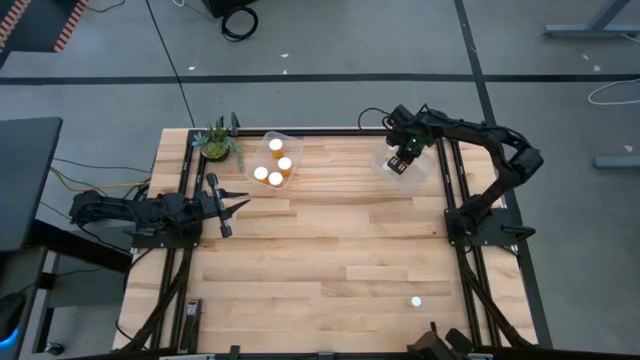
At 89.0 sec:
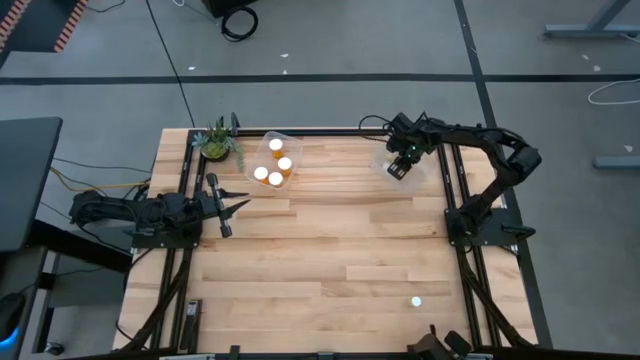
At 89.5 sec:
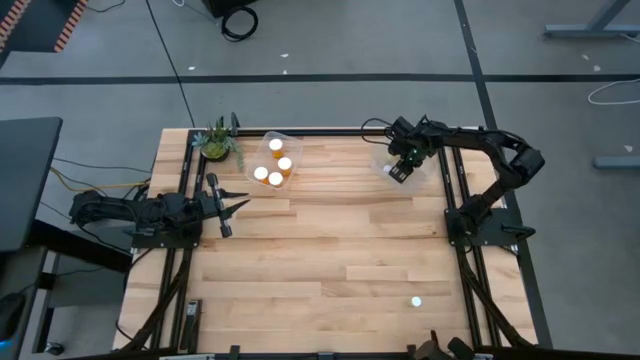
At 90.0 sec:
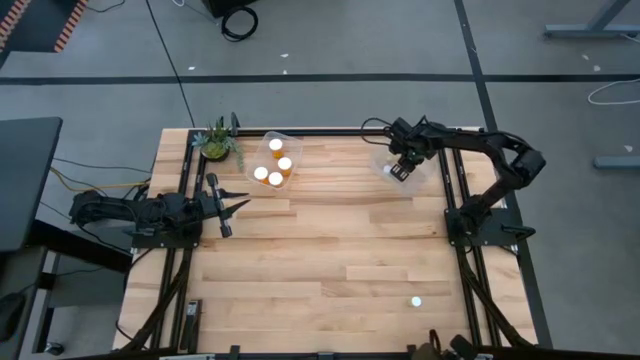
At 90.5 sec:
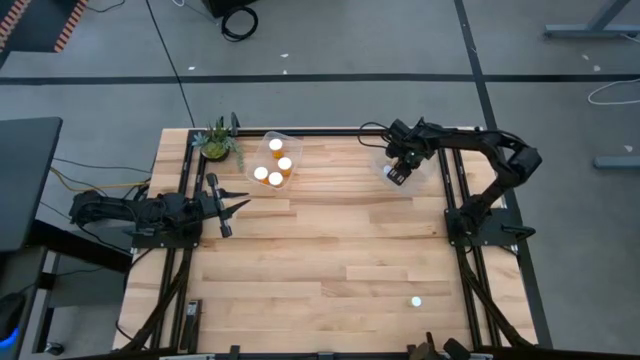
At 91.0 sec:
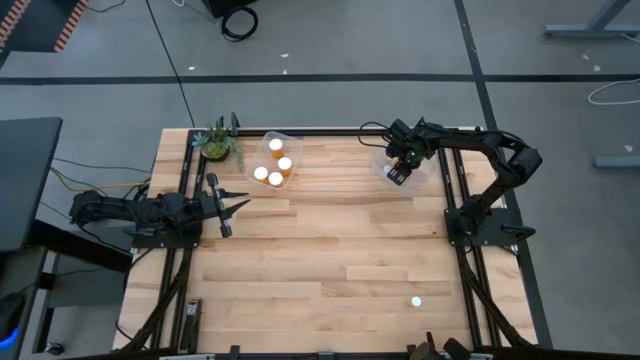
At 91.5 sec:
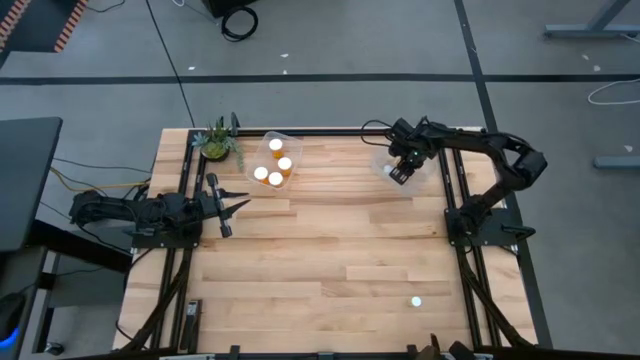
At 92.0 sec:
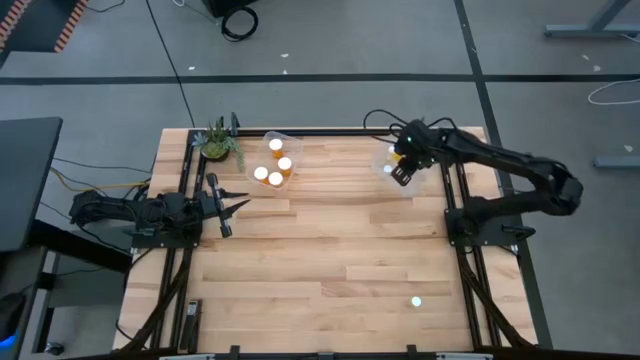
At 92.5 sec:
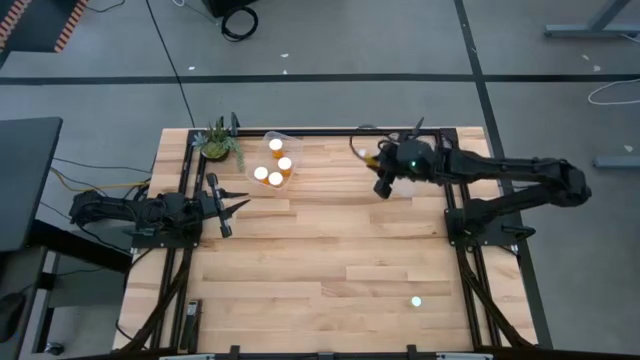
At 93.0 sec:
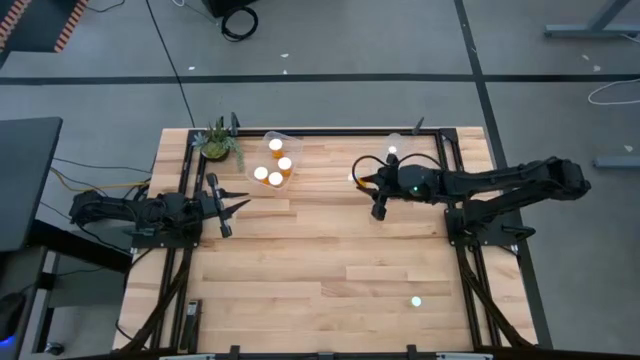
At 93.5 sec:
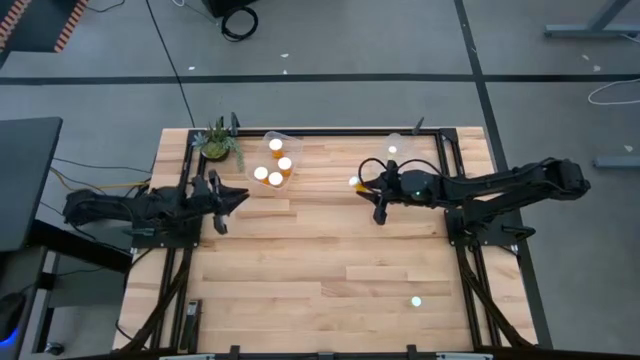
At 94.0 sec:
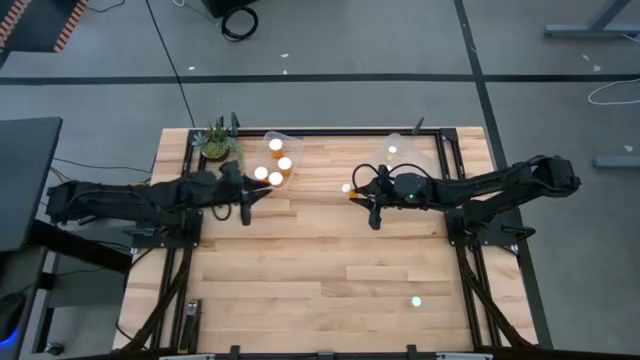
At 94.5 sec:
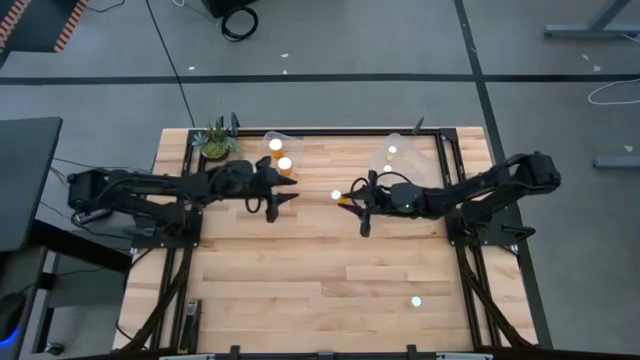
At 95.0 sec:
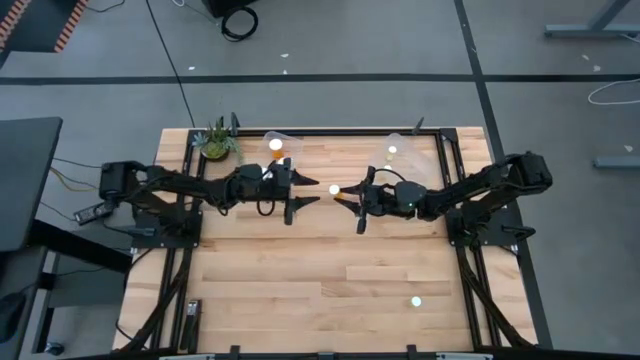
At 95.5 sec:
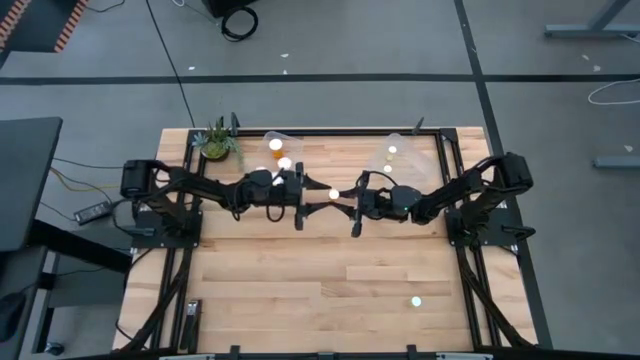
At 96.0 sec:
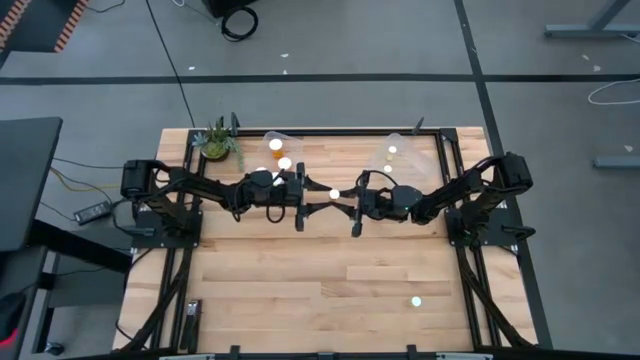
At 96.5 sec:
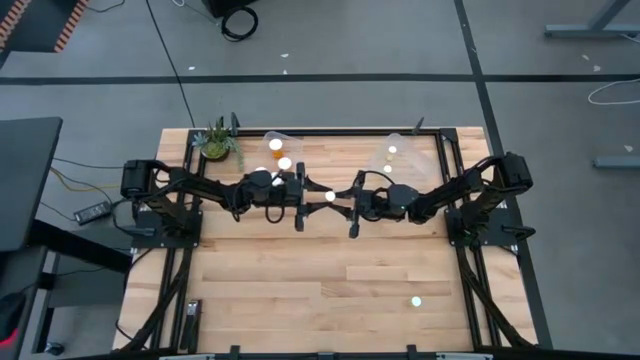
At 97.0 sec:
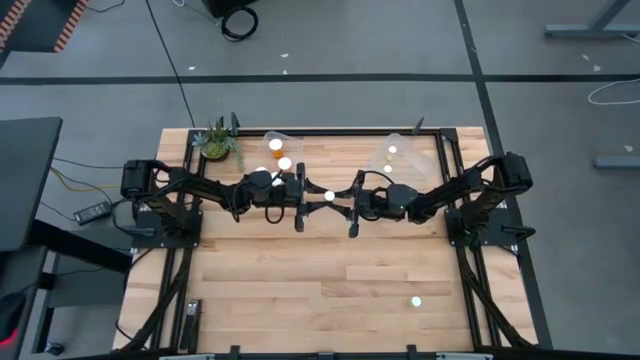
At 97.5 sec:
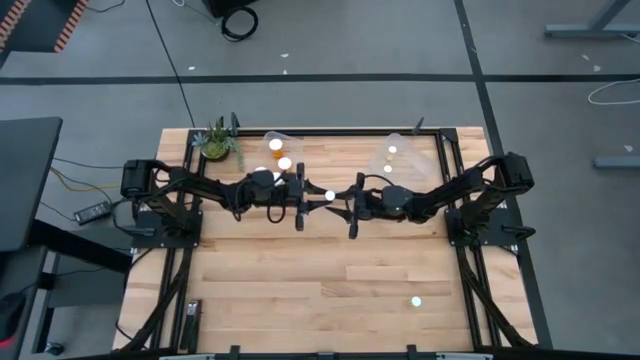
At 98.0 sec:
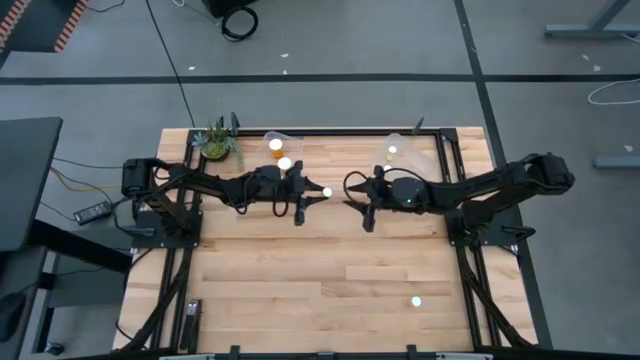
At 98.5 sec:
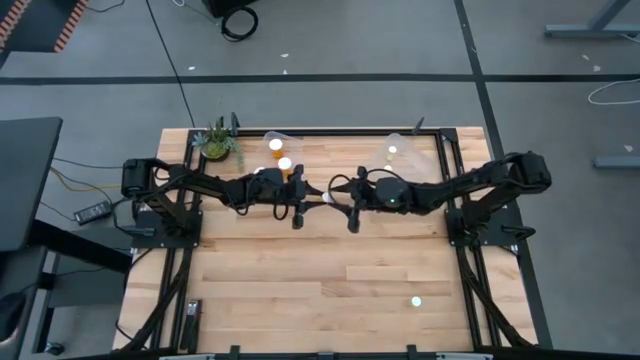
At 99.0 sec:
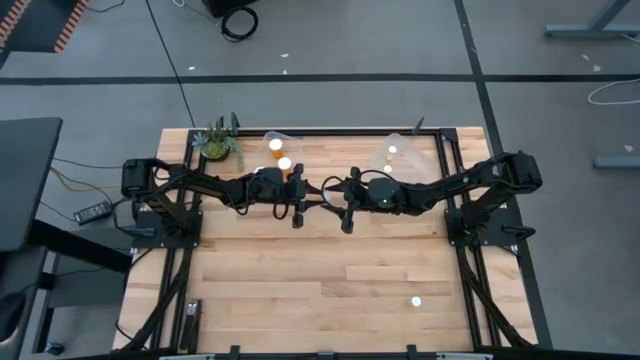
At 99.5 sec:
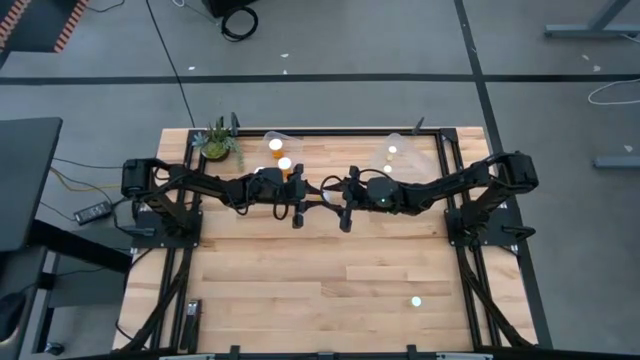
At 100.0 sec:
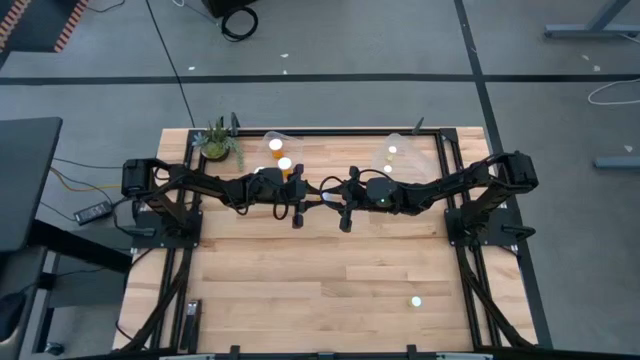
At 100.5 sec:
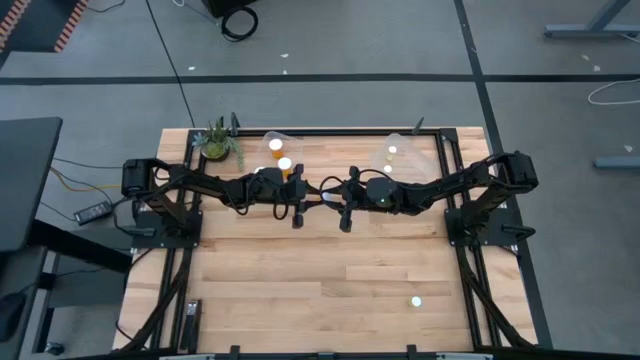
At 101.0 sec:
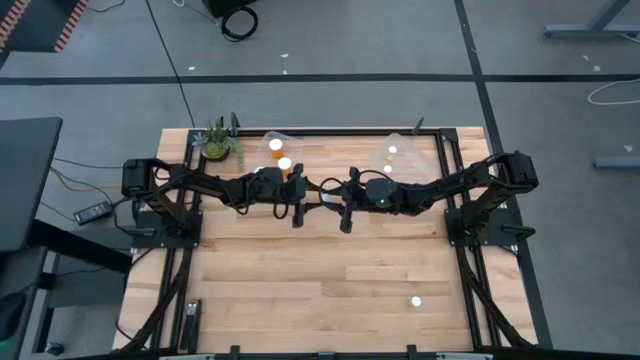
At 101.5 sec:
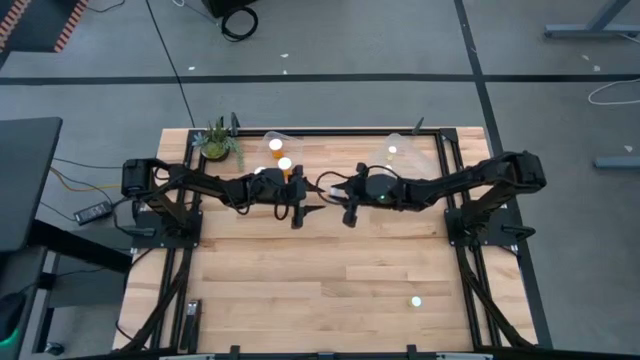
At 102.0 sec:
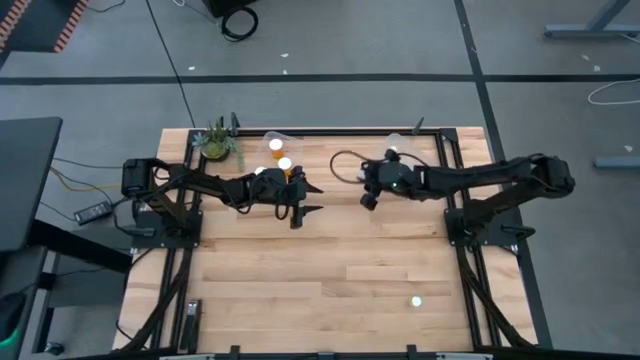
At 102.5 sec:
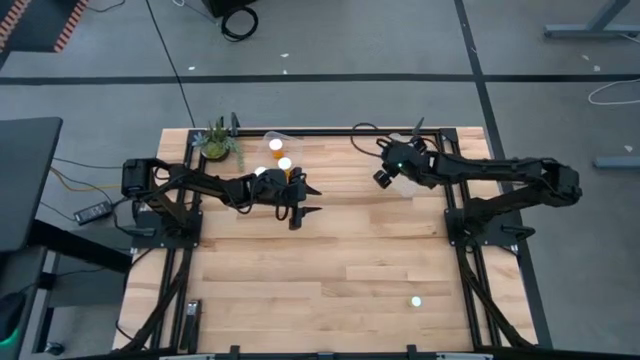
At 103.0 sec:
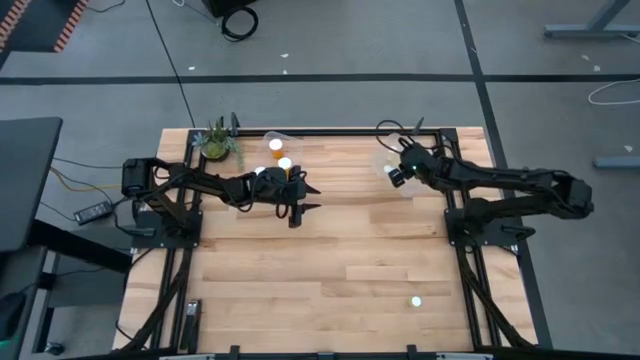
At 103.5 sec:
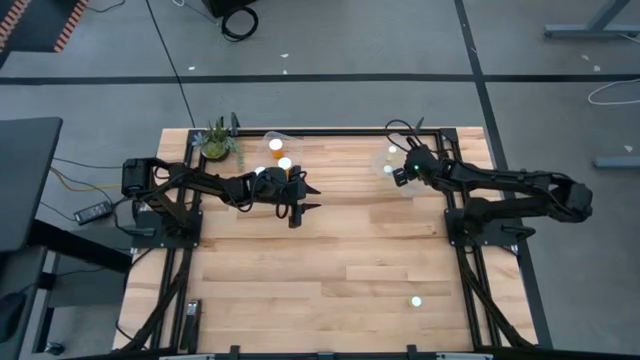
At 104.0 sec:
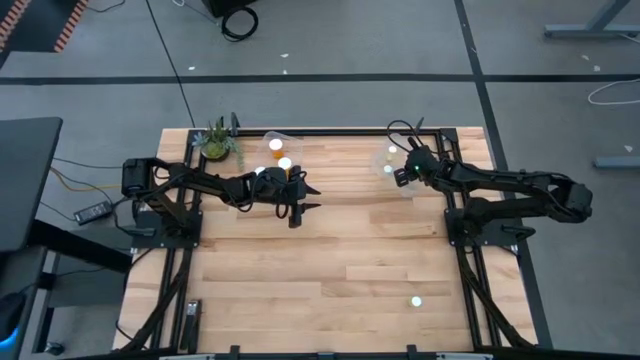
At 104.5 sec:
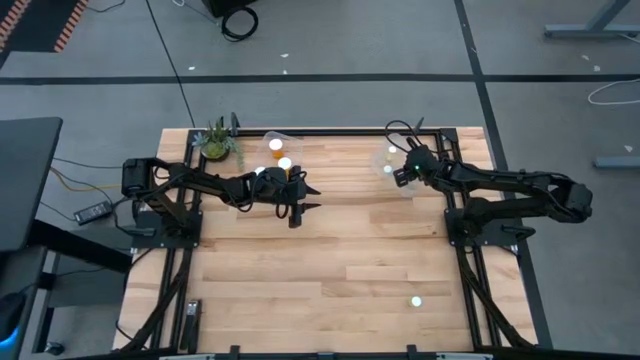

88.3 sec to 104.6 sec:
Task: Pick and place medicine bottles into bin by pill shape (circle, oval)
Put the small orange pill bottle into the right transparent bin

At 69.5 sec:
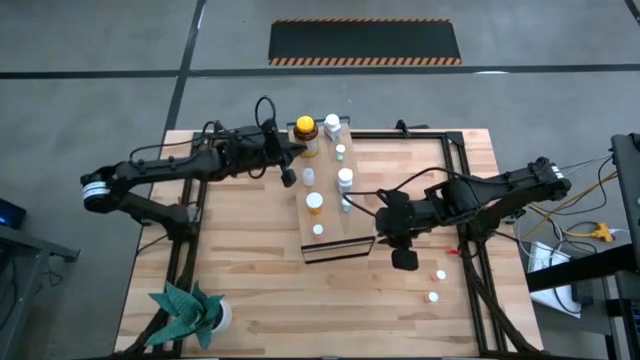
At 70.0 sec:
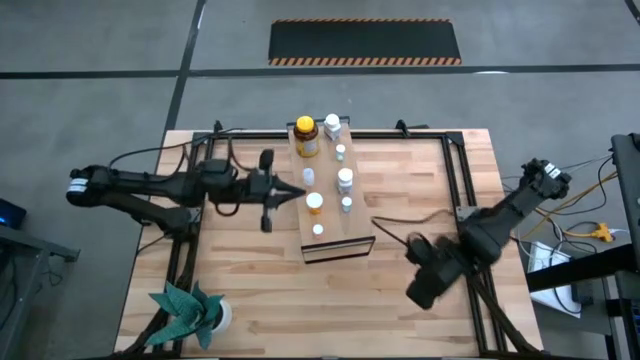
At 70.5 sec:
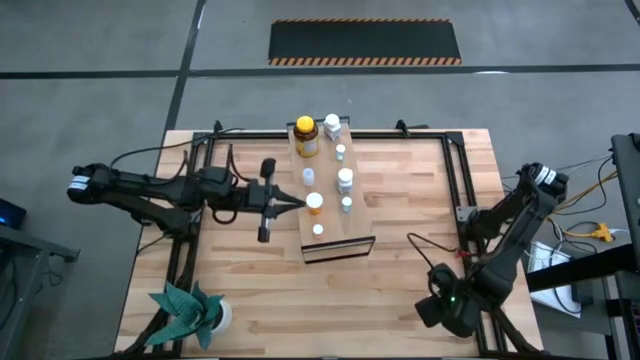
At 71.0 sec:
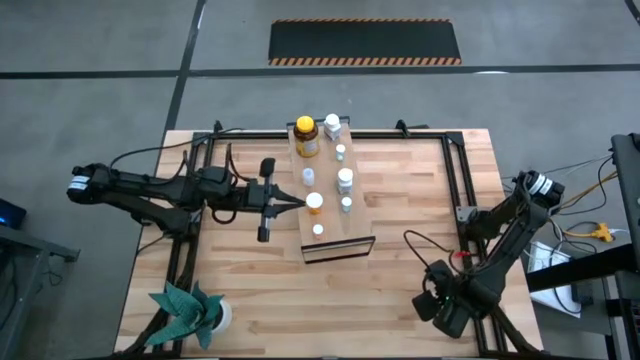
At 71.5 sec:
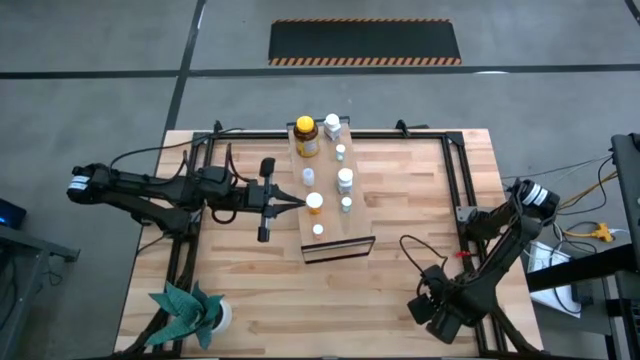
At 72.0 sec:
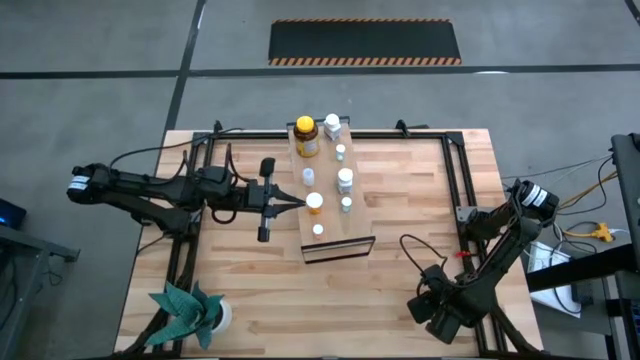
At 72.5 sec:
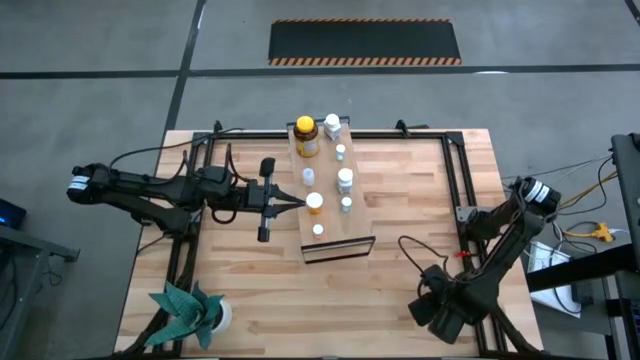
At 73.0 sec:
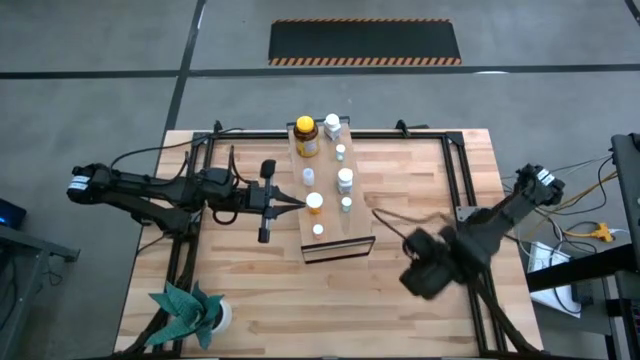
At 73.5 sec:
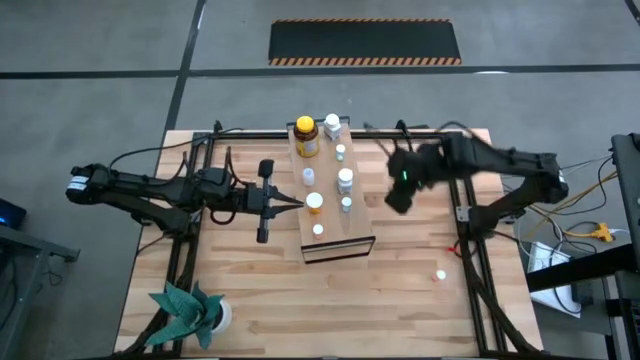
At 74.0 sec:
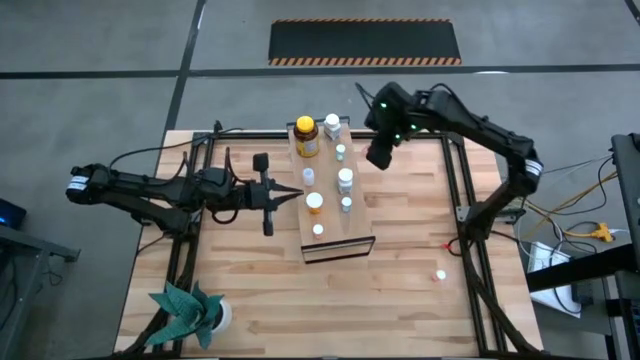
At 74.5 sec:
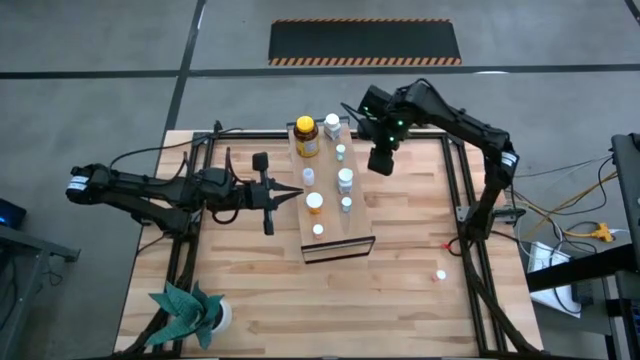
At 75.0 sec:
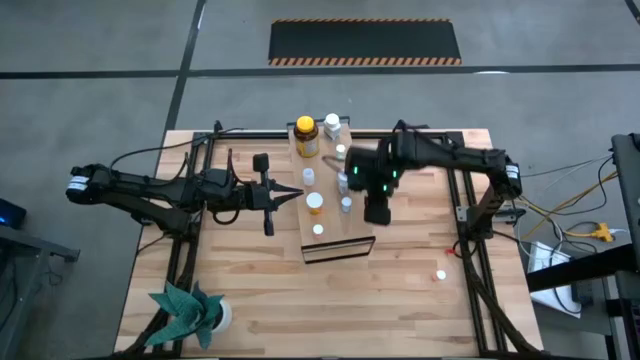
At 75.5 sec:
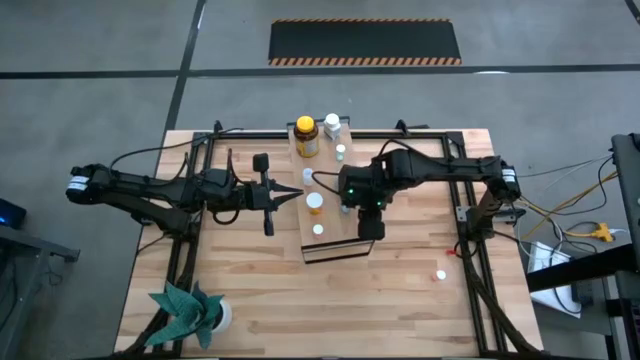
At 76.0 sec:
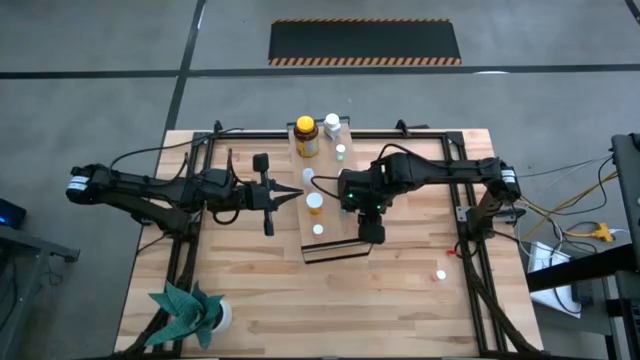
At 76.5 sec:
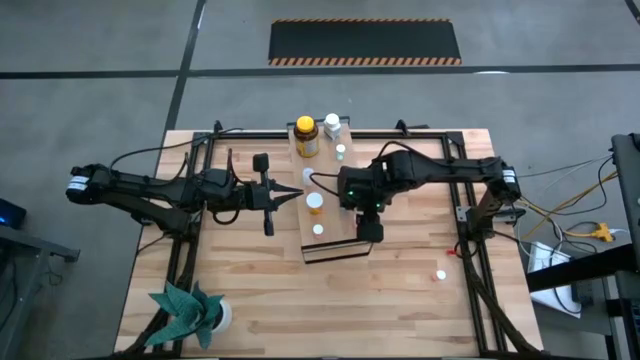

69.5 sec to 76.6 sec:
Task: Pick and place medicine bottles onto shelf by color
Put the bottom pink pill bottle on the shelf
